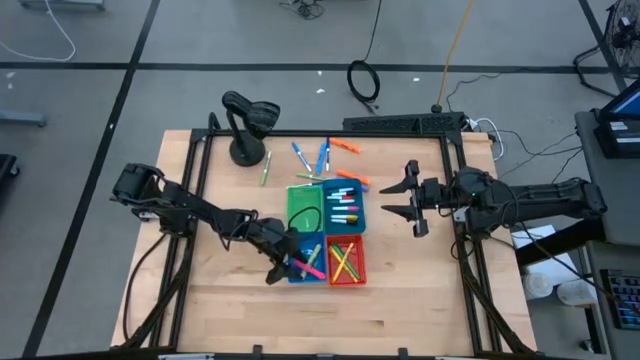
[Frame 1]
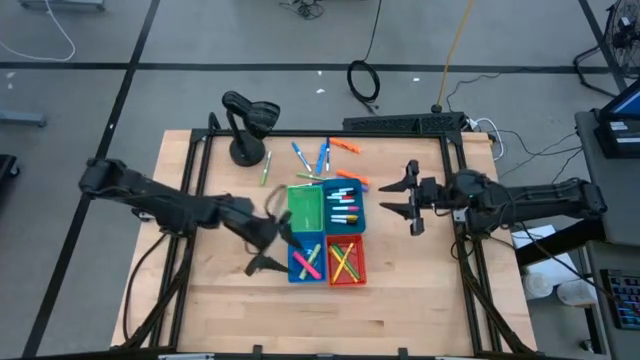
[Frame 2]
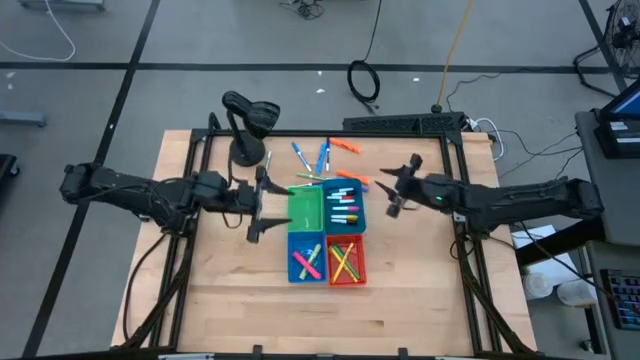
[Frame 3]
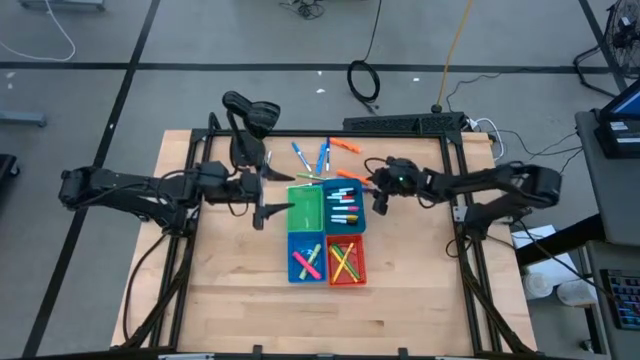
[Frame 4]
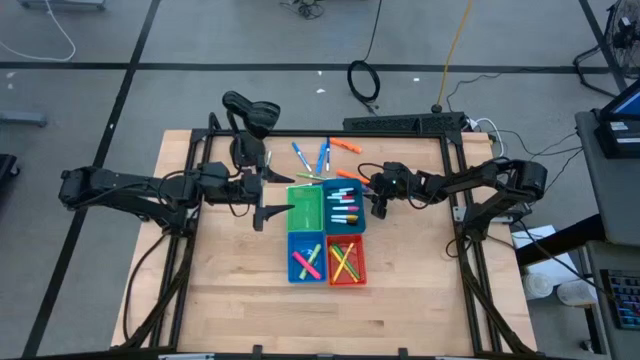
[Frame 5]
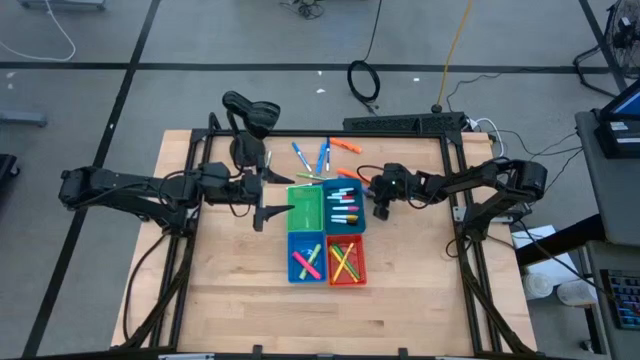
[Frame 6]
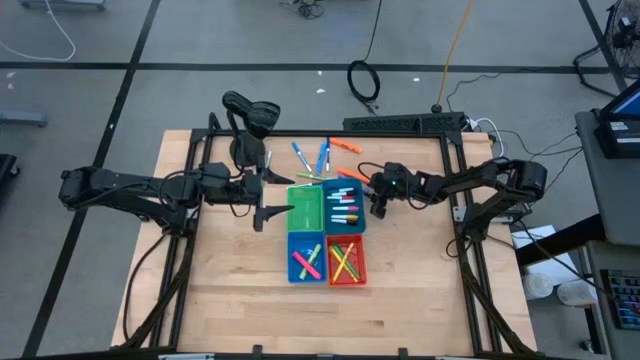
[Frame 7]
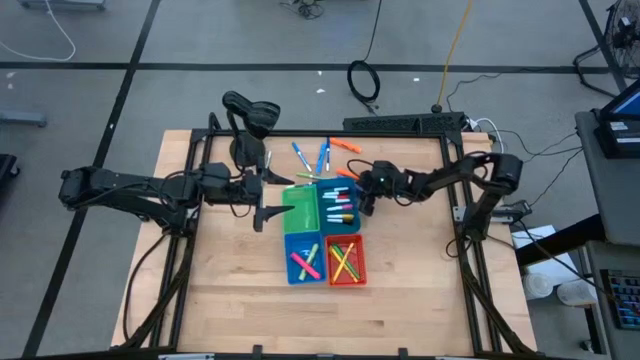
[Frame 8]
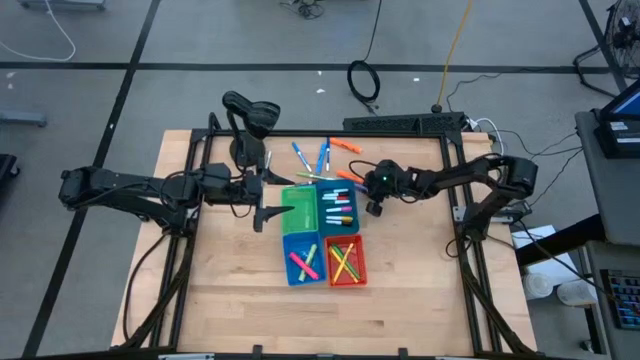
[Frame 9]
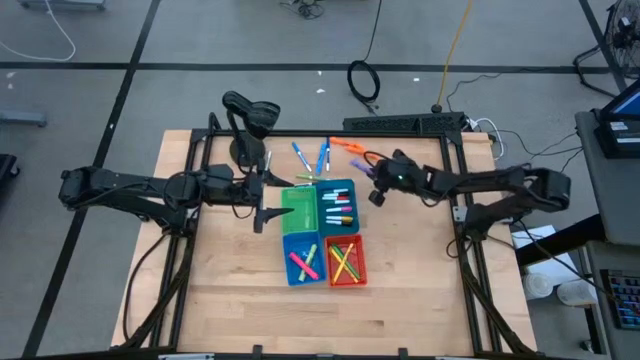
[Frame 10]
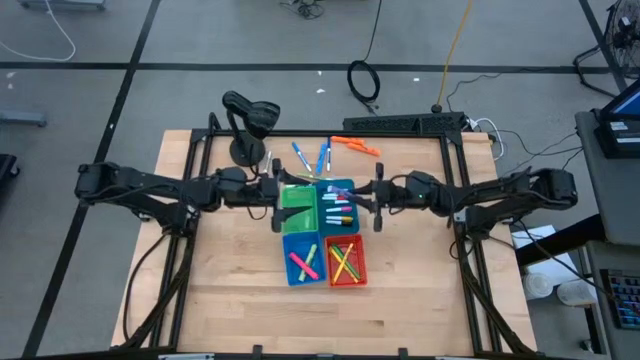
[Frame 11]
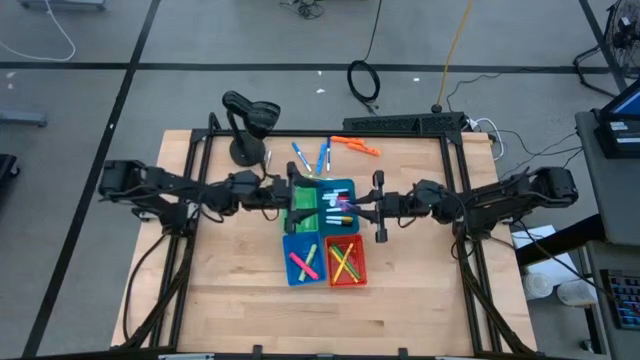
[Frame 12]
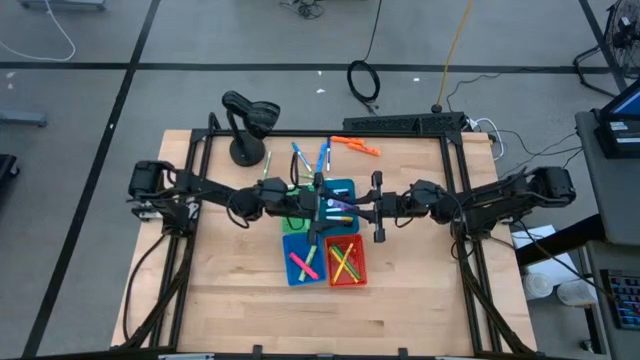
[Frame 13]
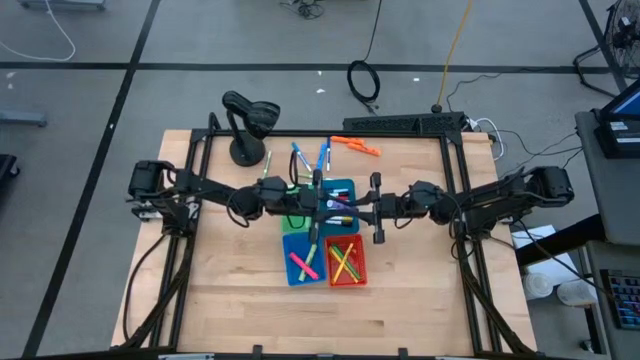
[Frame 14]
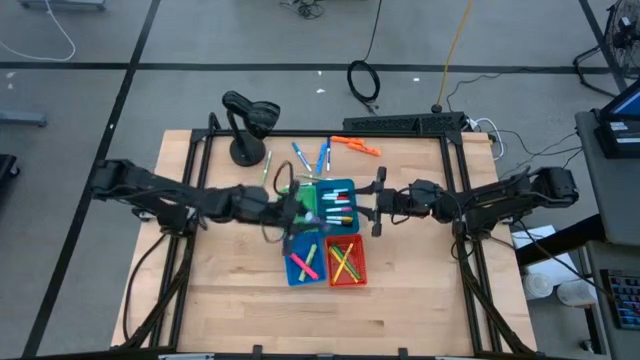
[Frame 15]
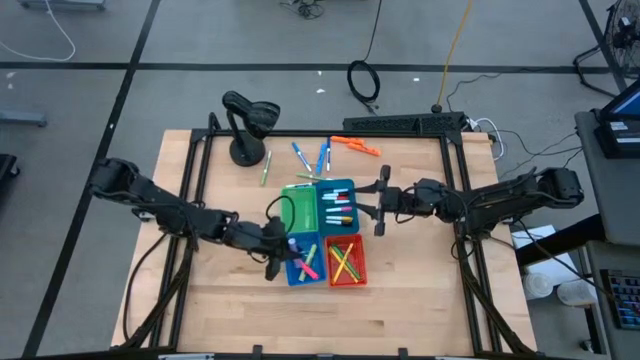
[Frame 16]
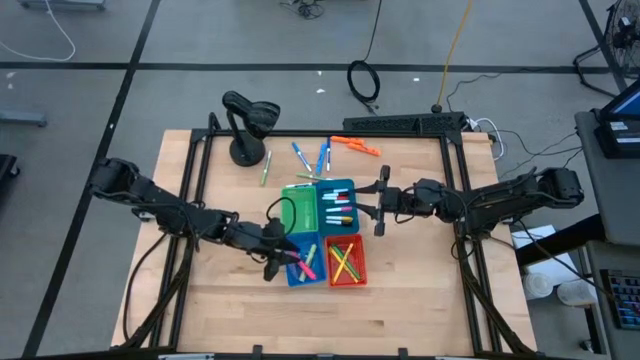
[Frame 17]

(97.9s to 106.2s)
Task: Pick & Place Markers
Put the purple highlighter pen into the blue bin

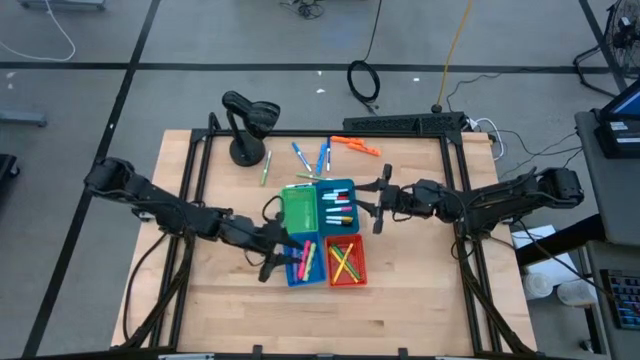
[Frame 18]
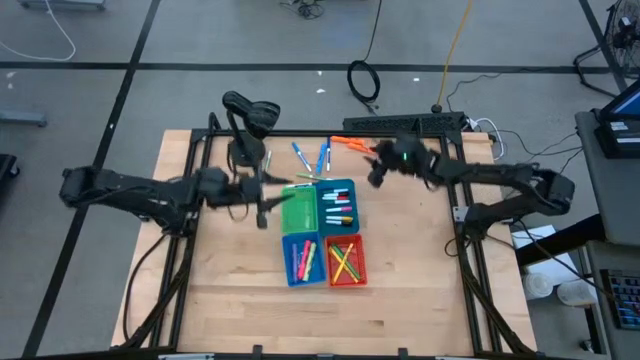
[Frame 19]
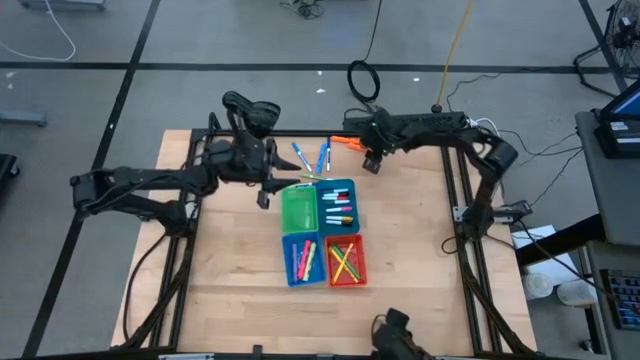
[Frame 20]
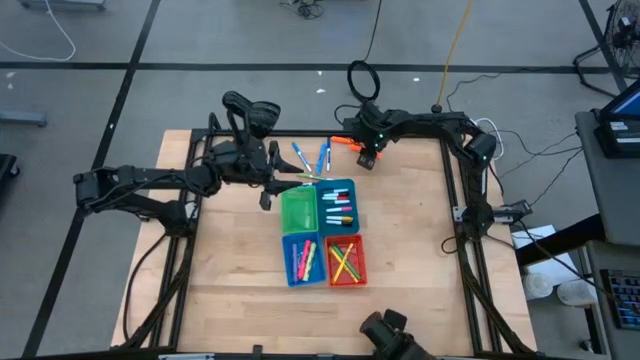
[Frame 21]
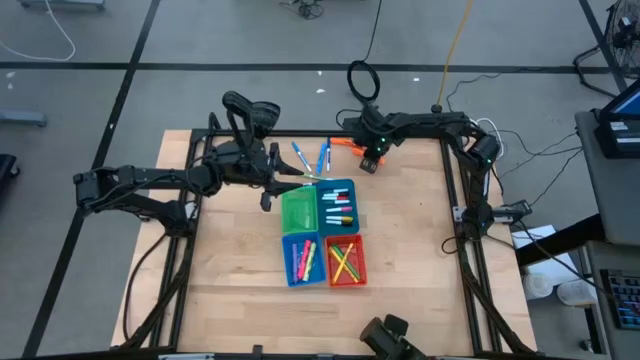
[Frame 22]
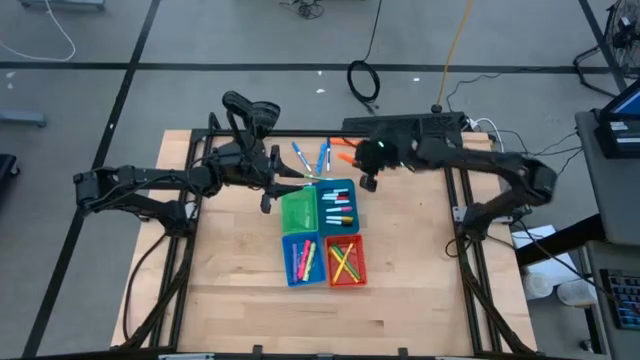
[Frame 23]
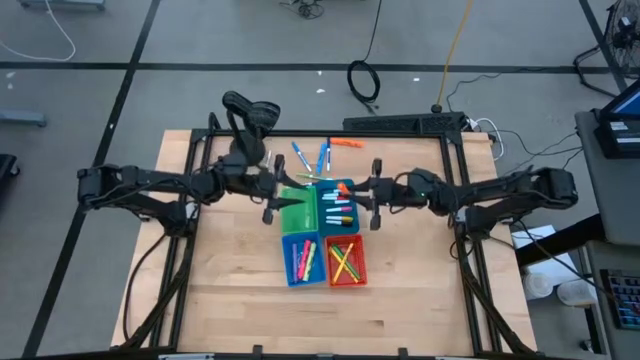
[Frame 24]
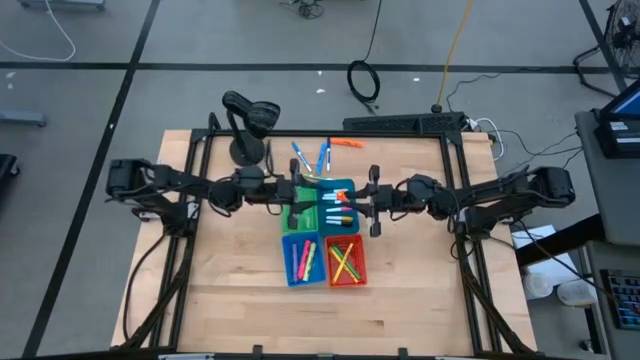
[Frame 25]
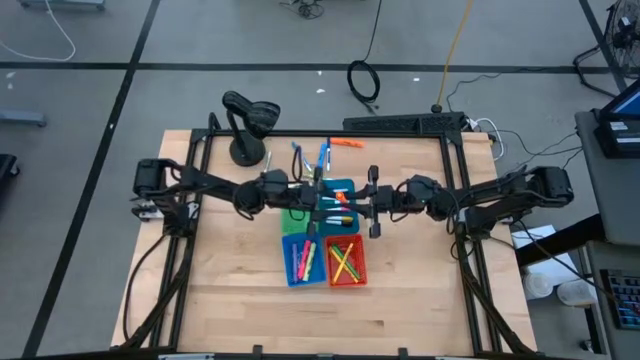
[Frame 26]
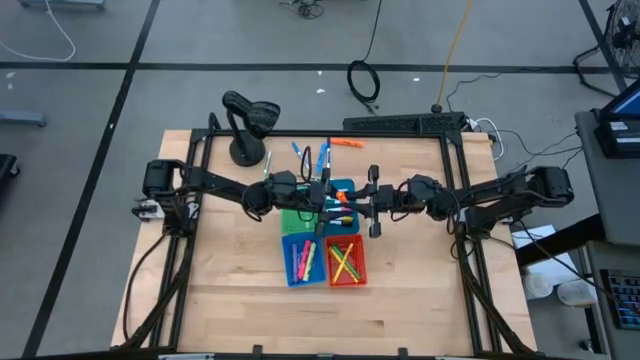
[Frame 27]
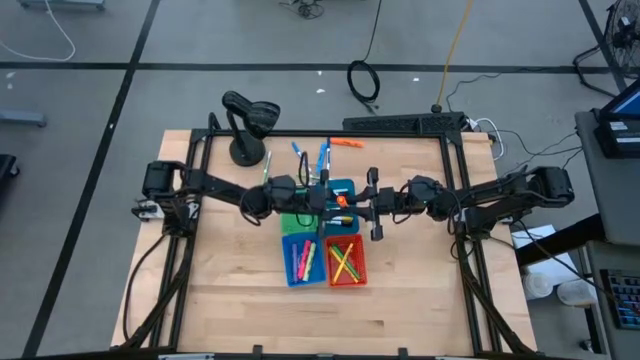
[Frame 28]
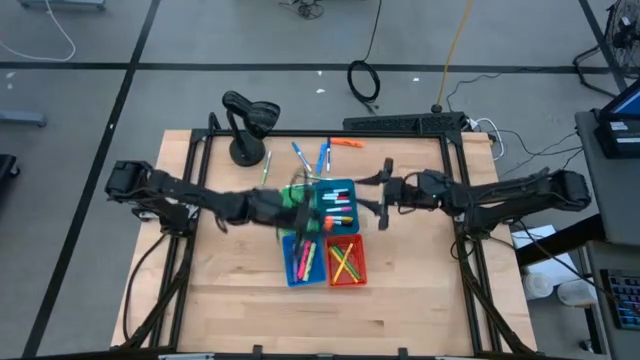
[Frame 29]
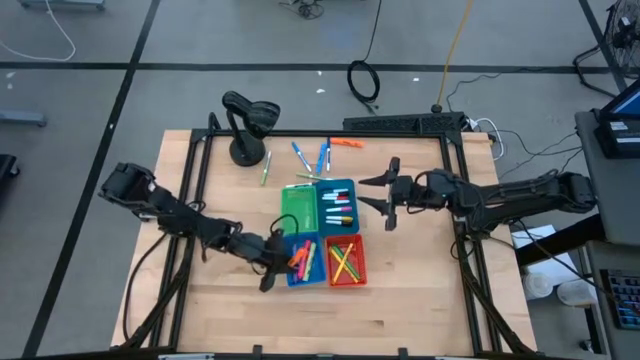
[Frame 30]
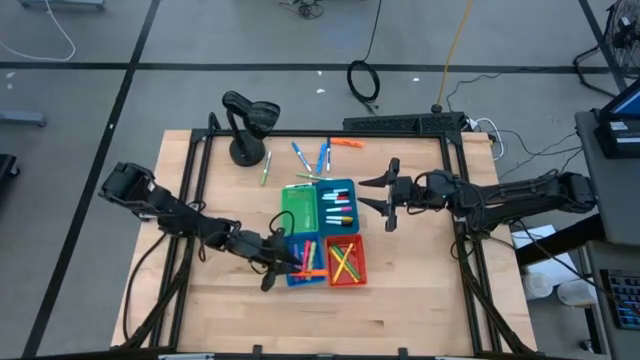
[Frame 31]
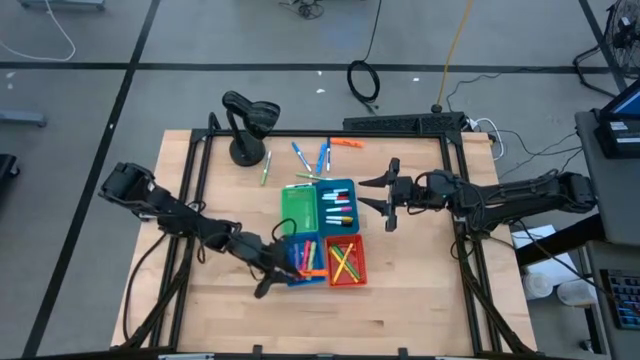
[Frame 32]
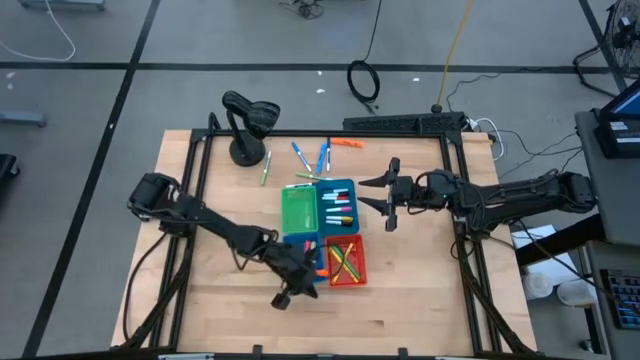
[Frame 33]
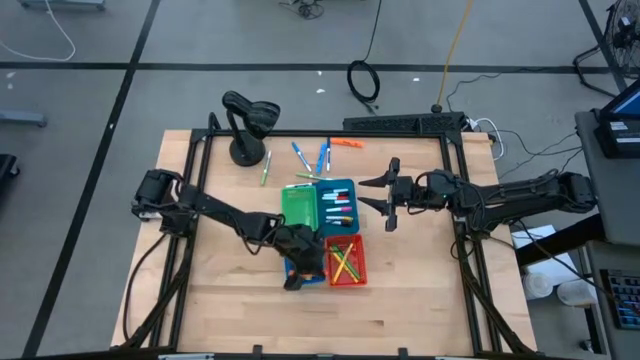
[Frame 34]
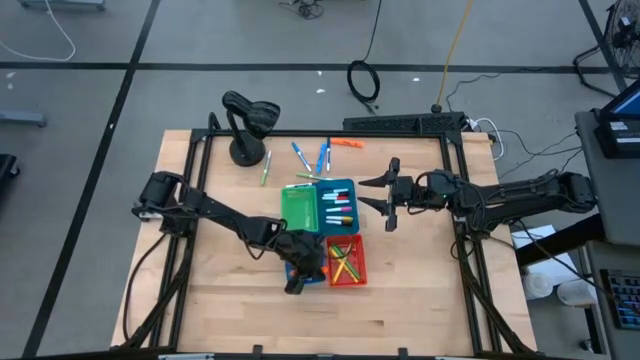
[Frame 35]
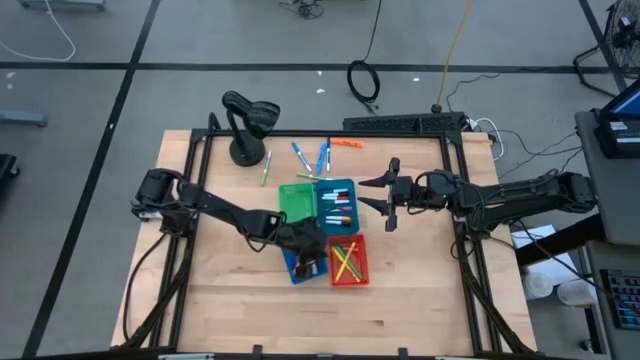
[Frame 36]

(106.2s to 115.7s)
Put the orange highlighter pen into the blue bin

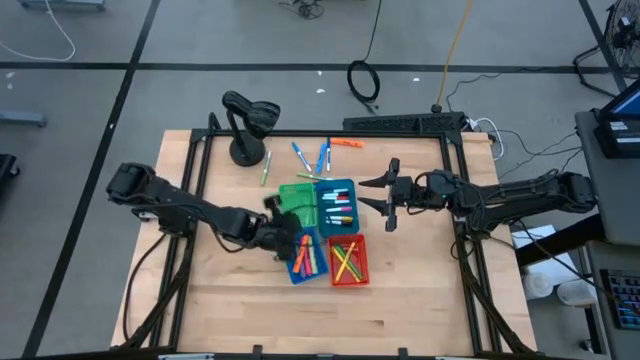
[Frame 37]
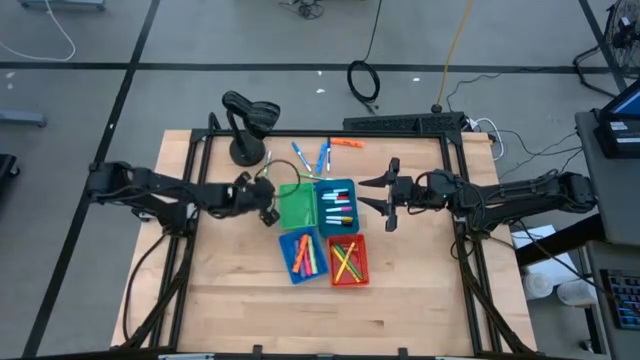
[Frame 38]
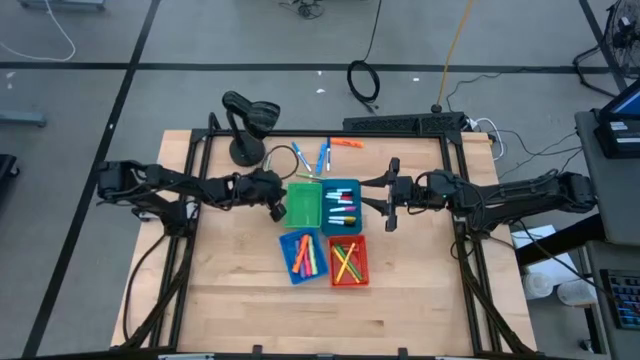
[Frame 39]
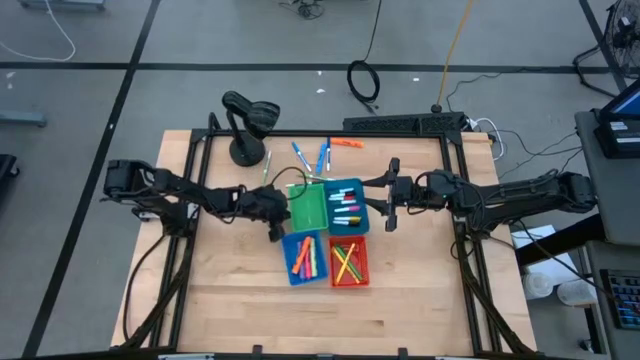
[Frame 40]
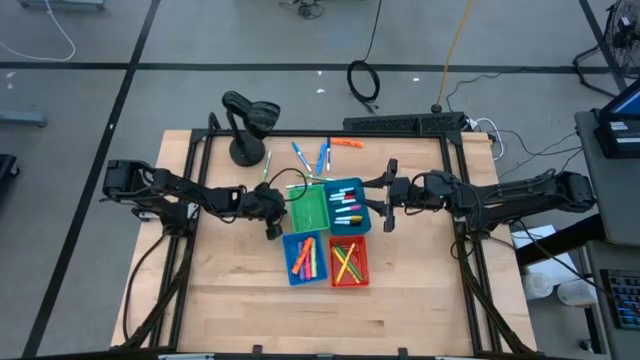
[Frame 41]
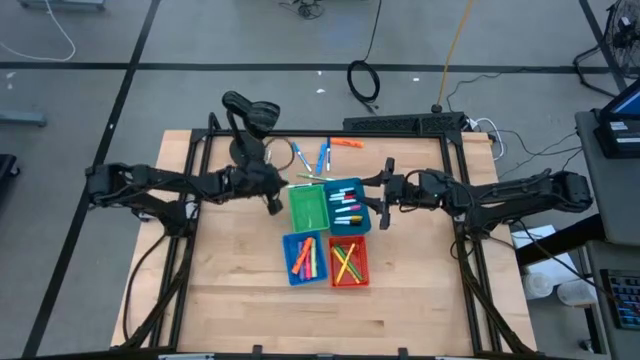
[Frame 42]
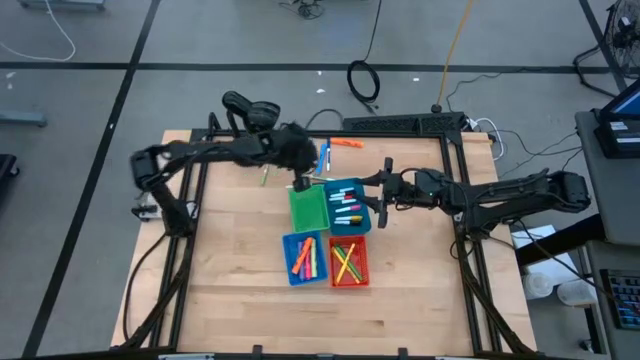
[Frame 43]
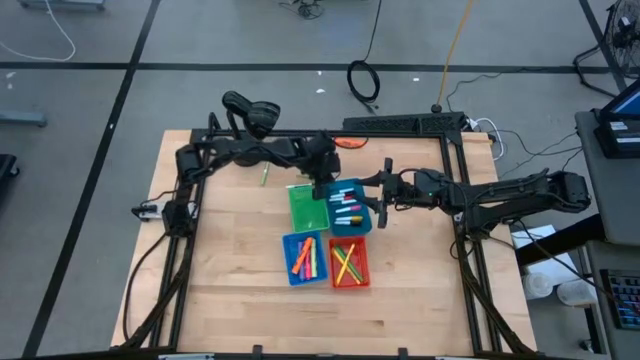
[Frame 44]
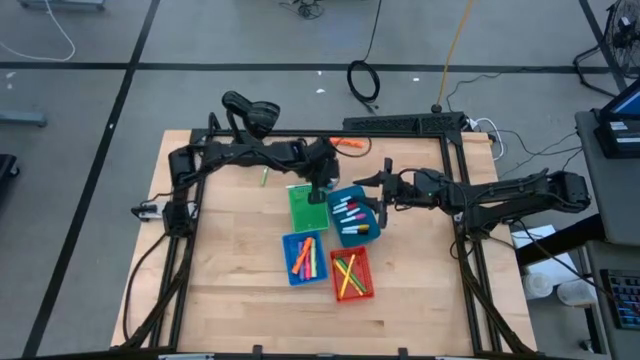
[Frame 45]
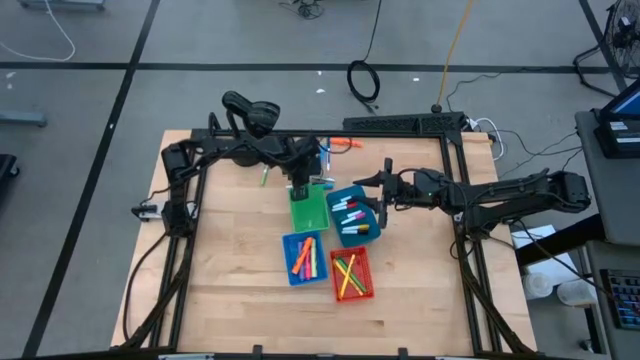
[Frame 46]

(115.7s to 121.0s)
Adjust the bins
